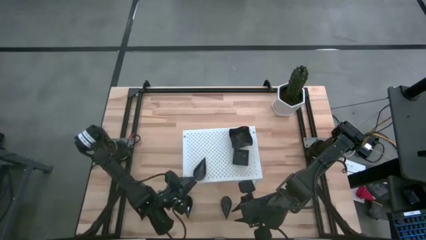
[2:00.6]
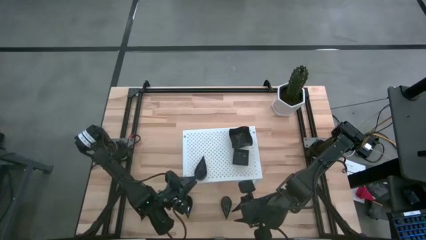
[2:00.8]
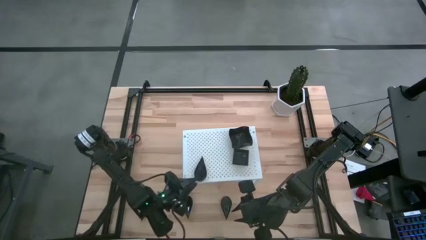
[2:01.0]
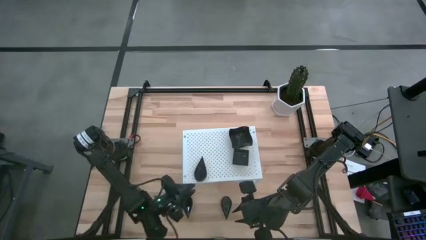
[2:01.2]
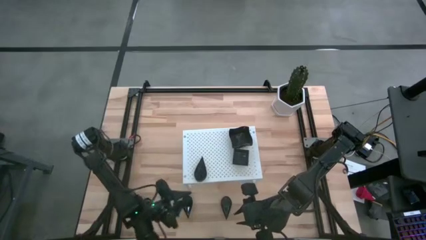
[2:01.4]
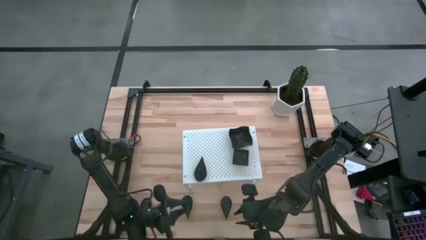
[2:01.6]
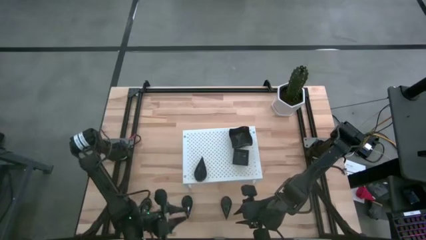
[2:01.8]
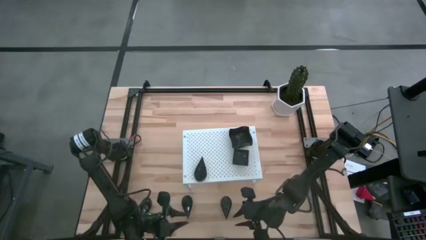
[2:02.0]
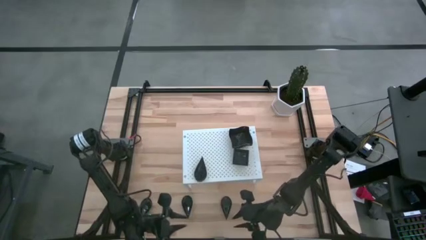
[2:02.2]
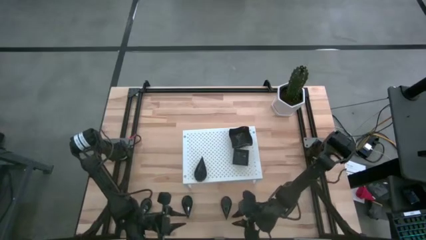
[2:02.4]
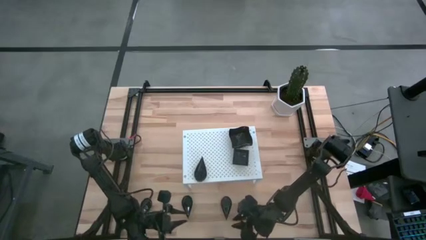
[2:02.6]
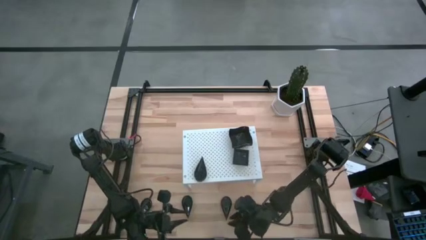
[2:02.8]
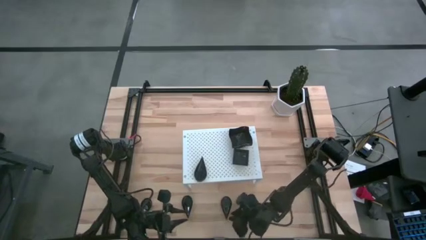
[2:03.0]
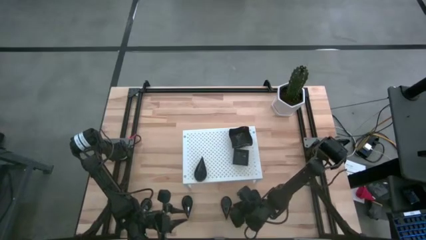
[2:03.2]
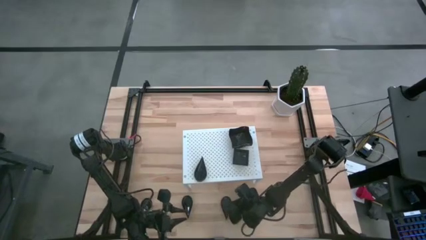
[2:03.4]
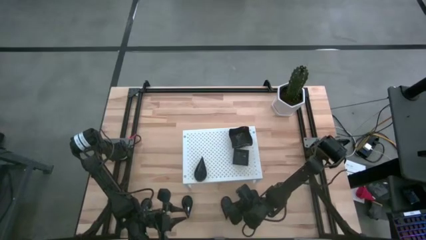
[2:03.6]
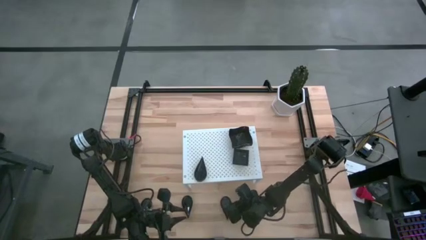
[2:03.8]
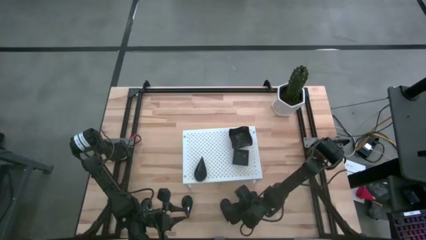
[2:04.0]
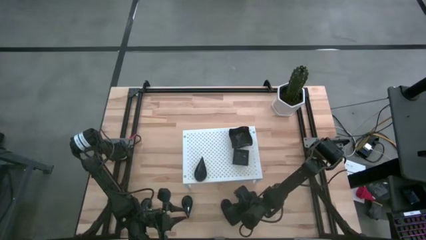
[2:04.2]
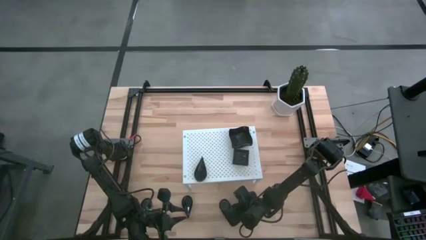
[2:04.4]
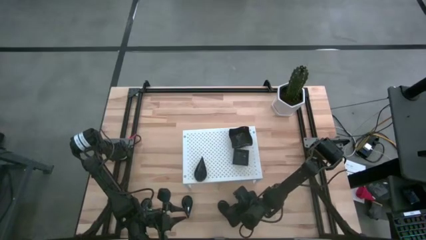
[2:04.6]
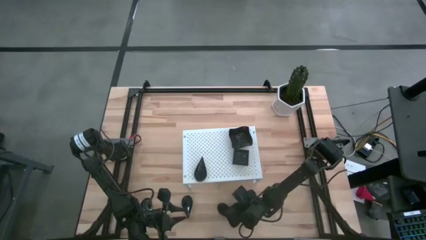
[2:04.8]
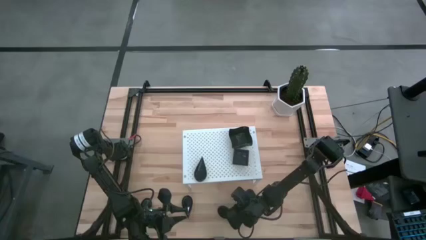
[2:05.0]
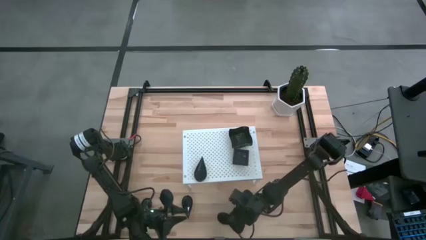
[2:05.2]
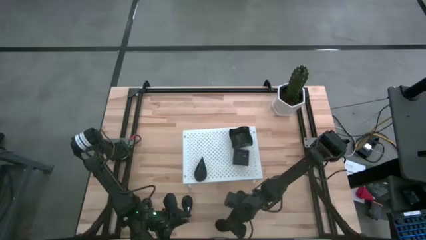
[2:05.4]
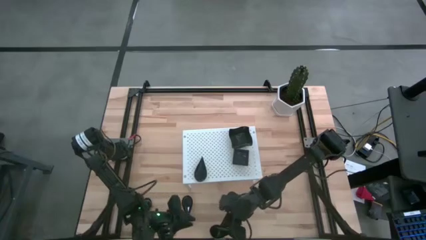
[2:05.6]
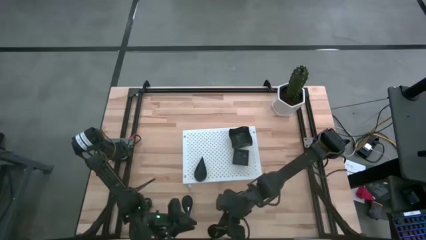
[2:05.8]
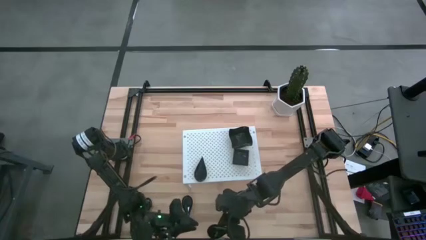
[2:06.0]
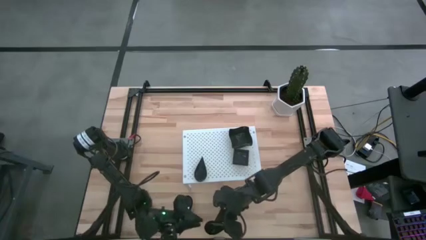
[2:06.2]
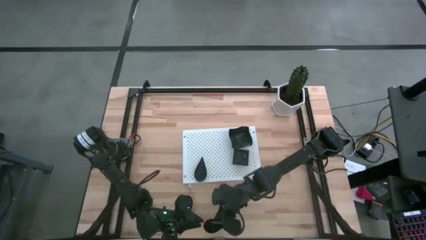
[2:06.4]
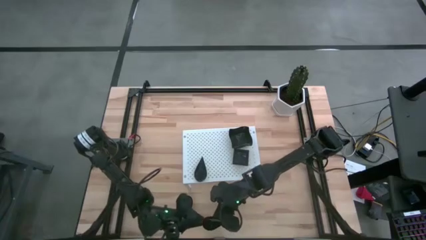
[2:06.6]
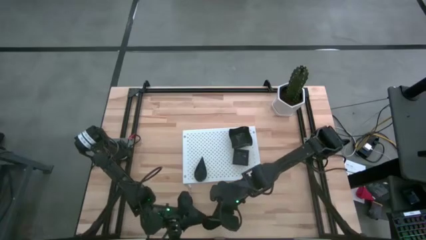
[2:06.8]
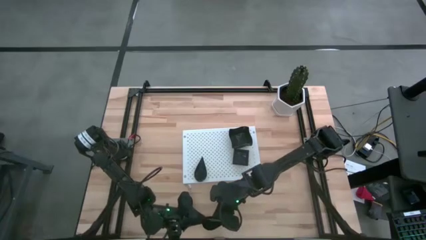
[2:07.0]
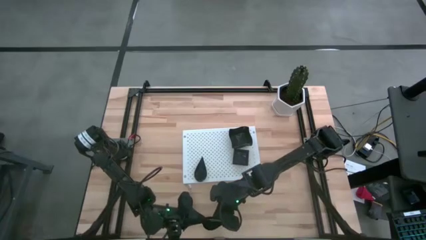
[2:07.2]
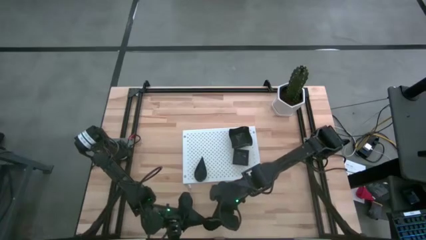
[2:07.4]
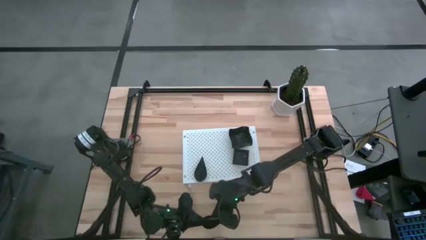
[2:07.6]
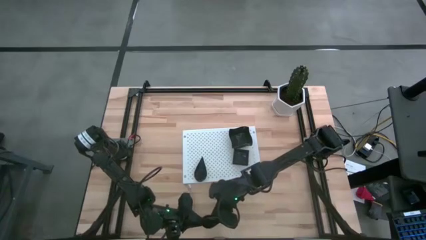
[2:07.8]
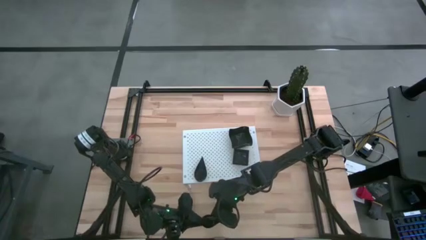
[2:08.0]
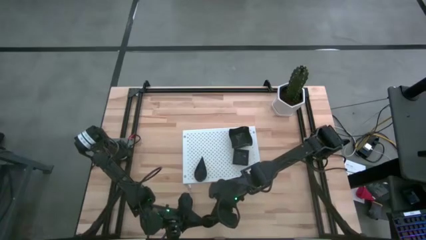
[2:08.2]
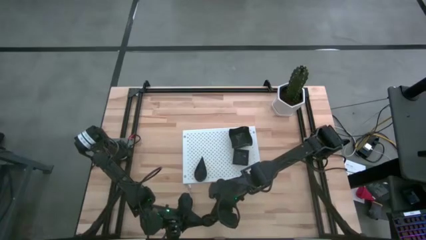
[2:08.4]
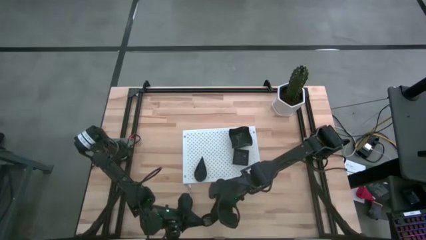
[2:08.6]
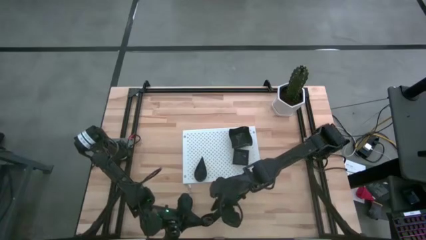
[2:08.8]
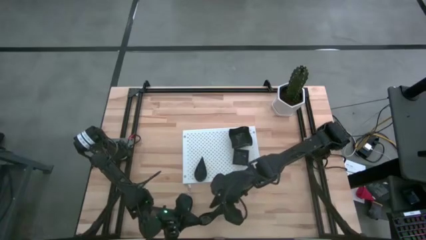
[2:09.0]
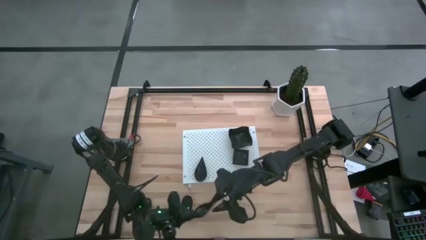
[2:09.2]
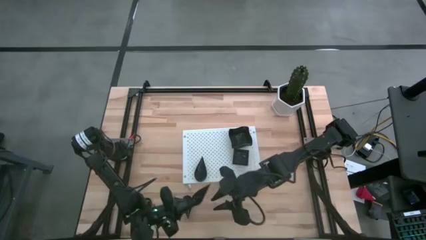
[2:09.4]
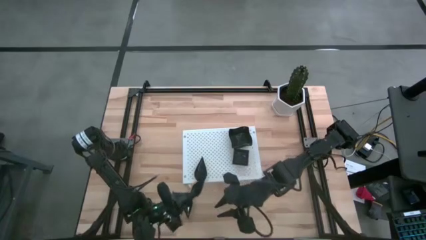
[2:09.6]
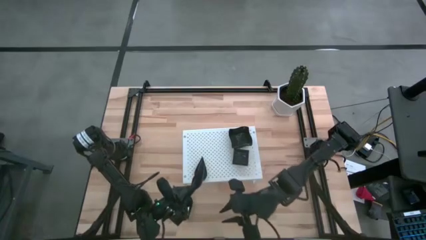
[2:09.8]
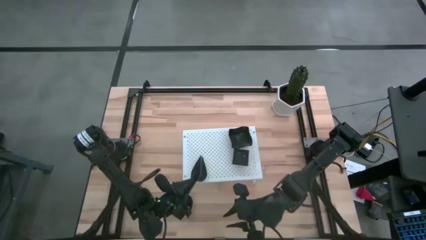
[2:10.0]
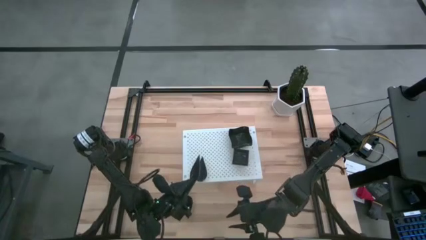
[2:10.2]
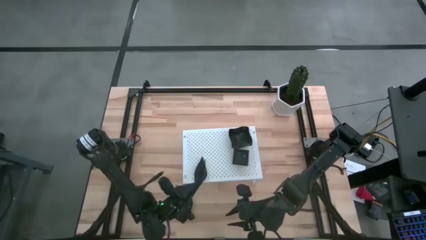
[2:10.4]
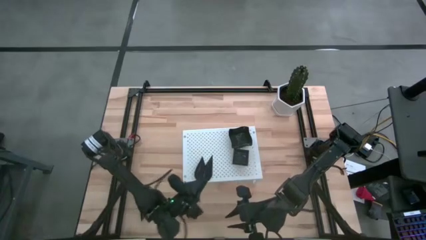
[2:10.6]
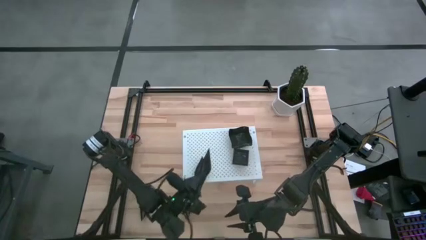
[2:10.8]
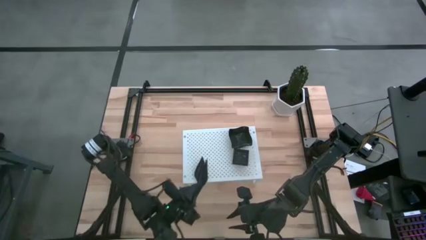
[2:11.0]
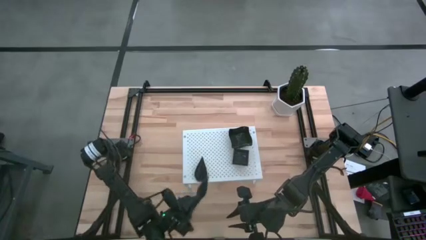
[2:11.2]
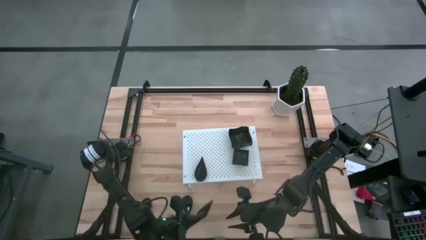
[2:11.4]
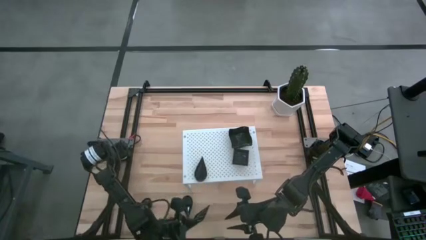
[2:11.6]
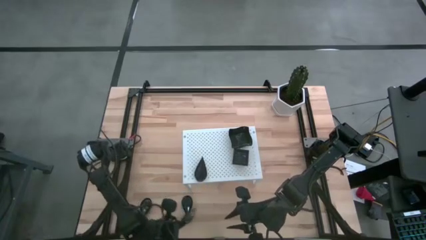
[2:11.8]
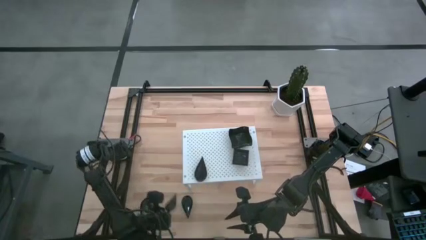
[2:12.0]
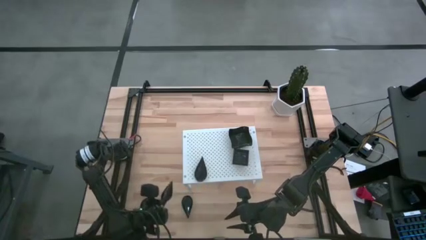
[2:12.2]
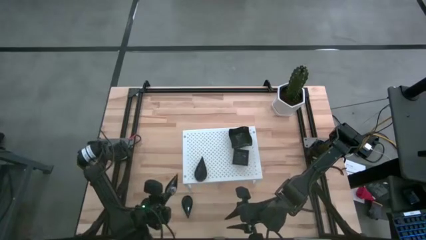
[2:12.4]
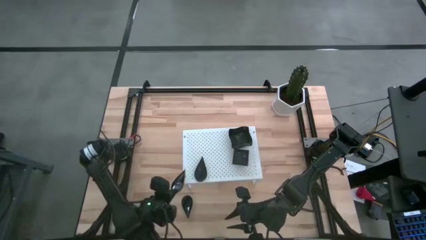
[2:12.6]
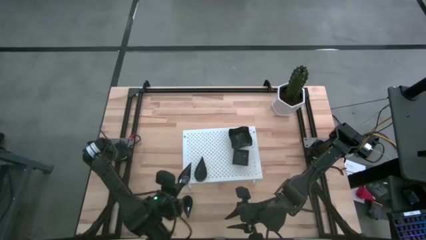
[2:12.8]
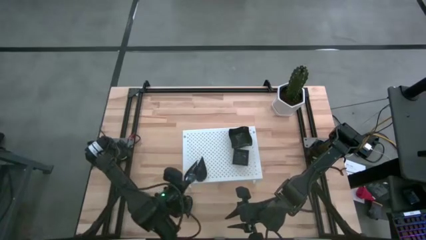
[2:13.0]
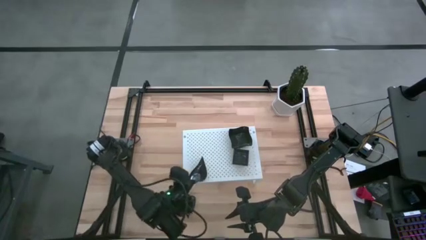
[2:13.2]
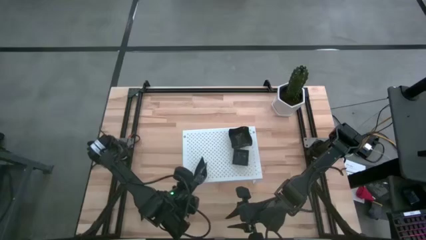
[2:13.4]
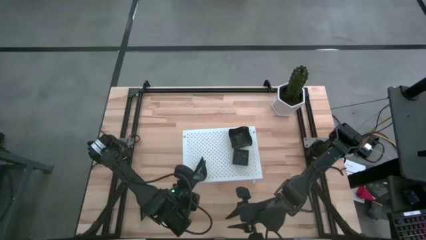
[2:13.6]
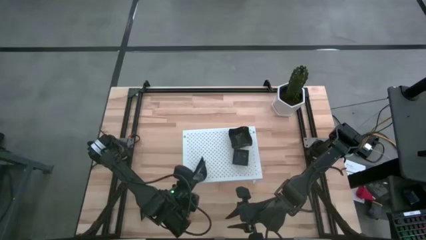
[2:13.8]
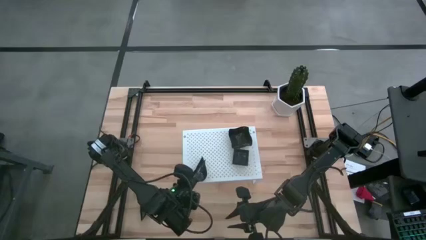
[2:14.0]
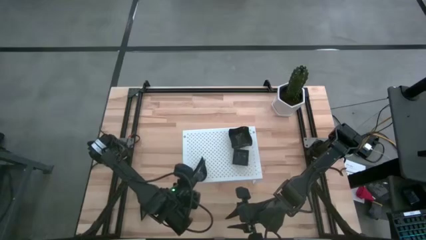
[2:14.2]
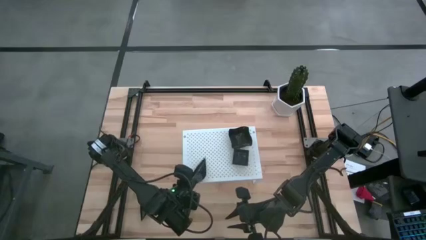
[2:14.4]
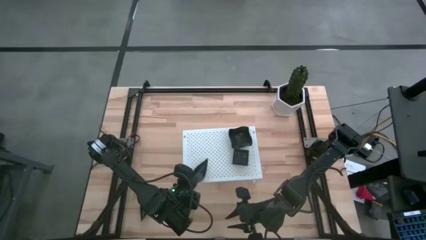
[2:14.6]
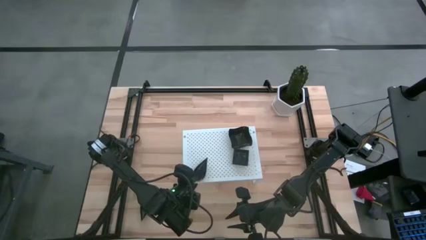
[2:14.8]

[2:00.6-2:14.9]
Task: Pick & Place Mini shaped plates
Stack the drop-shaped plate on the other drop-shaped plate on the shelf

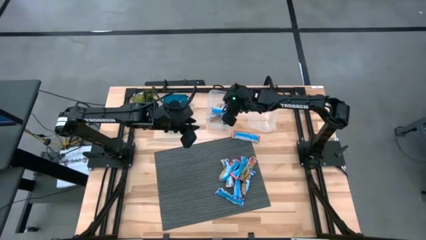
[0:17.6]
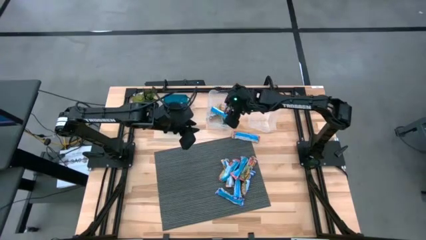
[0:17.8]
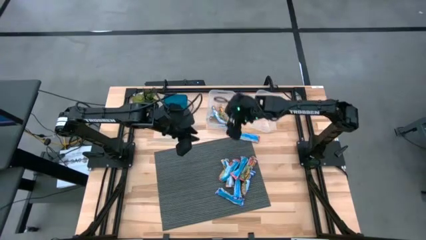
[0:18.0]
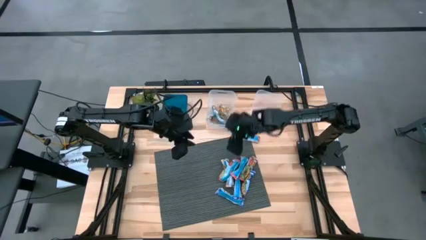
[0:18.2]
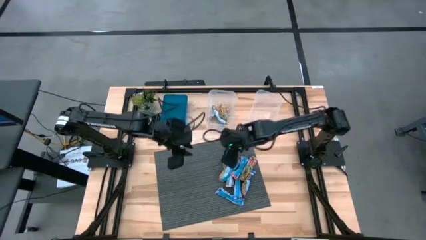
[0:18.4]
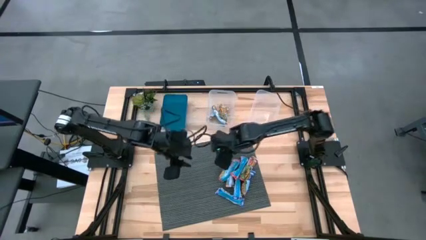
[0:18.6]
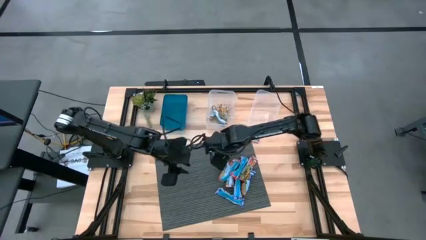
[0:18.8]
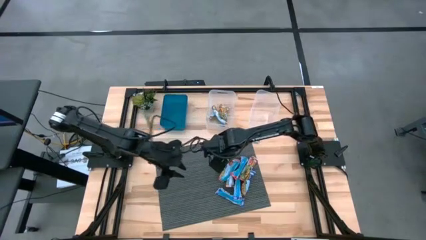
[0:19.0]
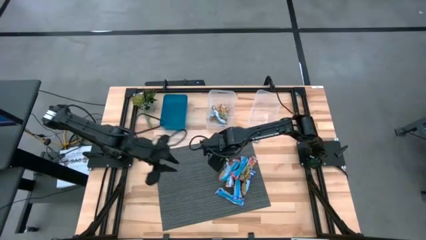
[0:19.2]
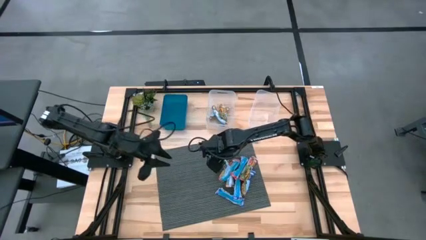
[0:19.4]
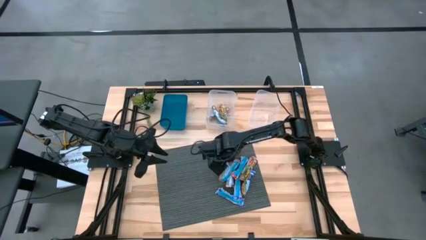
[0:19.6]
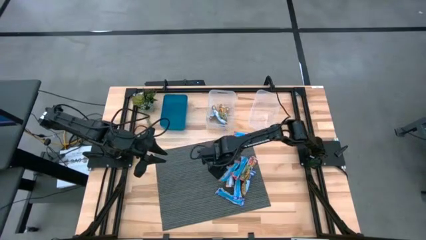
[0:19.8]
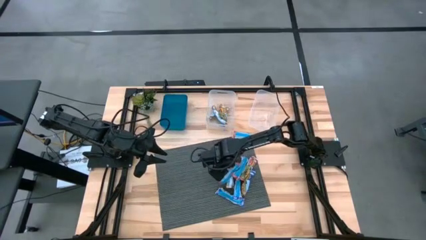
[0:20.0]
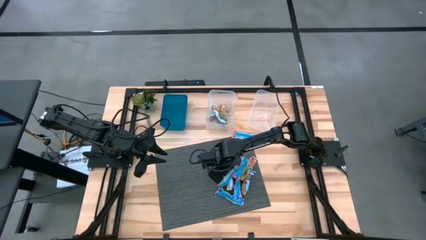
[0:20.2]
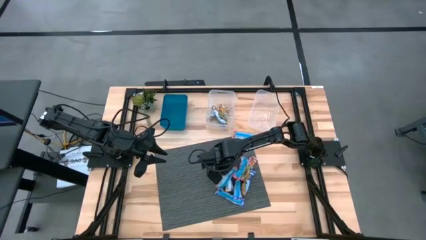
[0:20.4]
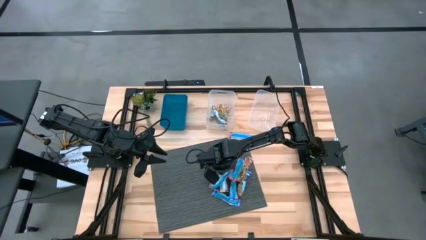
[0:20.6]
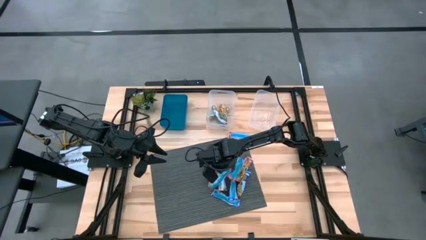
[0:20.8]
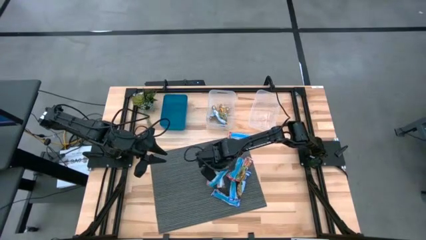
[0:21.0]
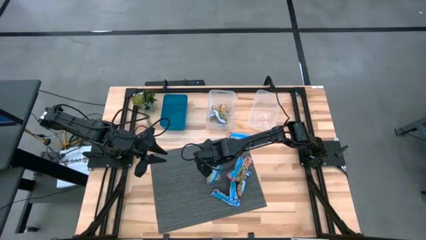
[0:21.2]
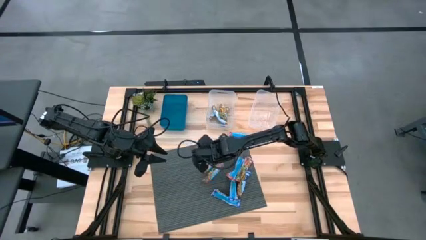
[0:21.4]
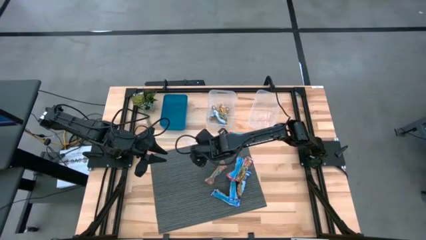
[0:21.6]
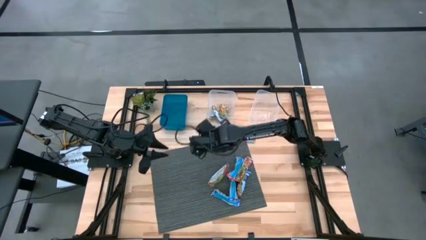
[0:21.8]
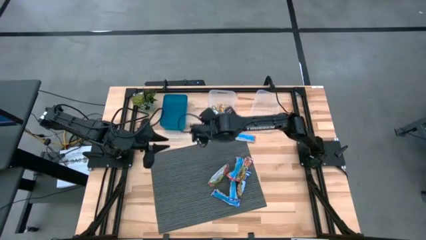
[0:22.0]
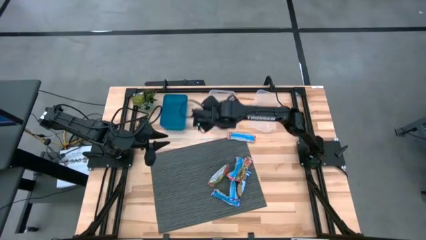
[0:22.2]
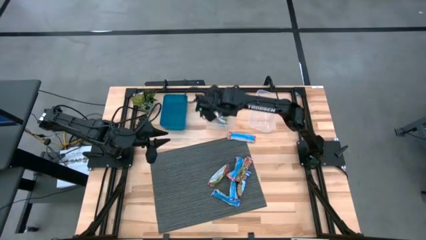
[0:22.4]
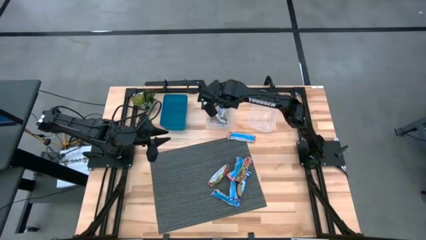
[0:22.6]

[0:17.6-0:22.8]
Task: Pick and place Granola Bars by type
Put the yellow granola bar into the left transparent bin
